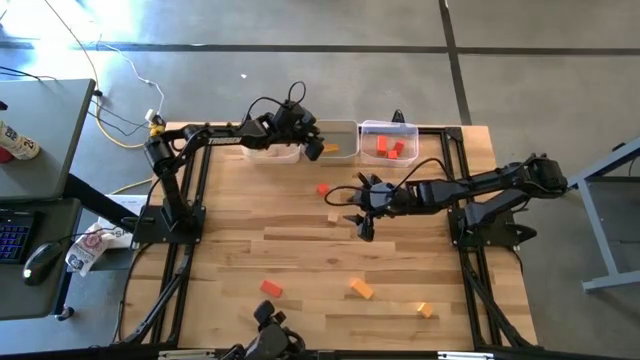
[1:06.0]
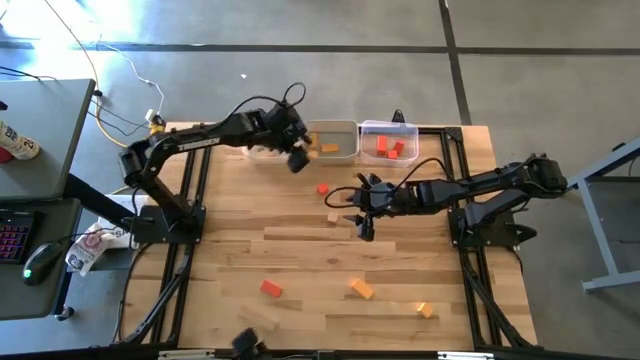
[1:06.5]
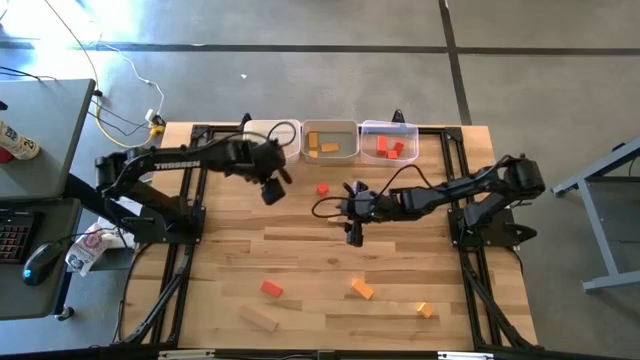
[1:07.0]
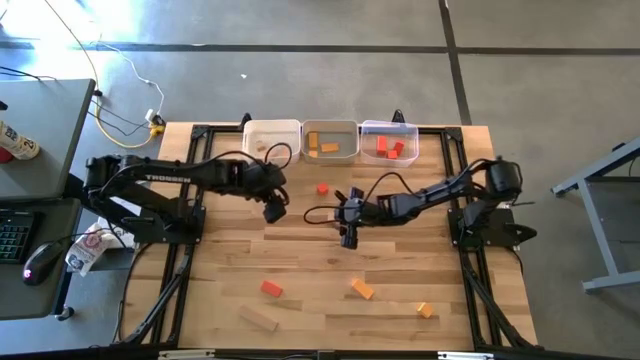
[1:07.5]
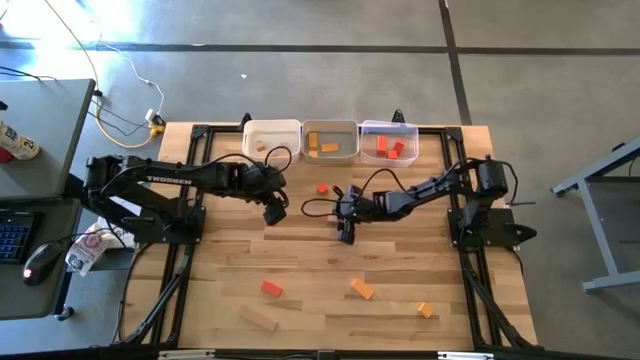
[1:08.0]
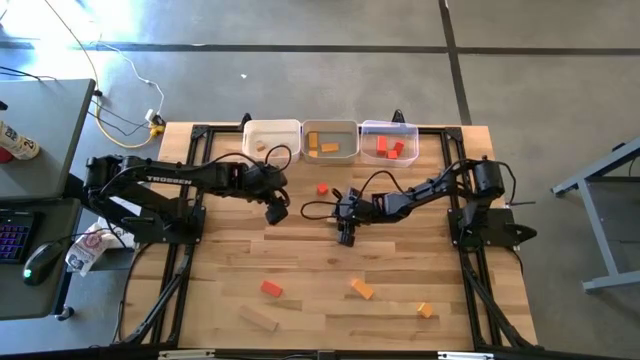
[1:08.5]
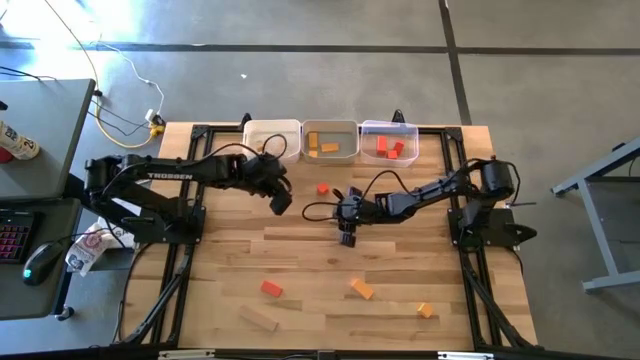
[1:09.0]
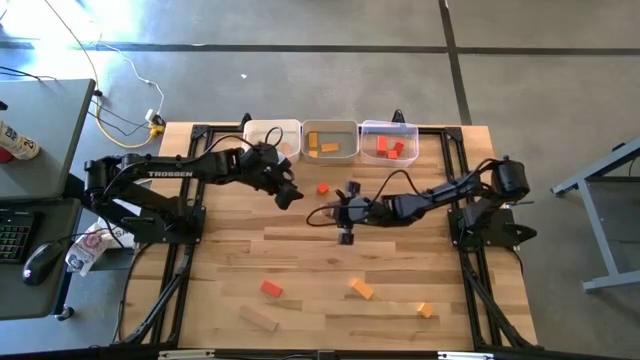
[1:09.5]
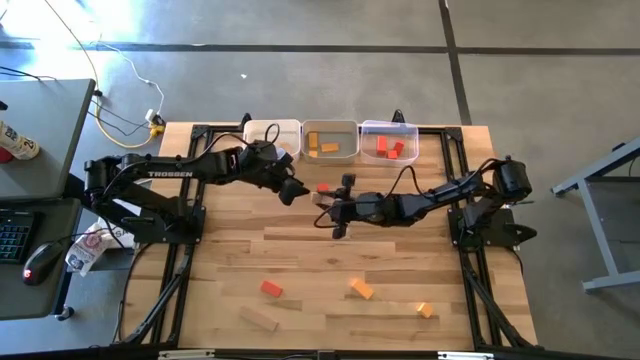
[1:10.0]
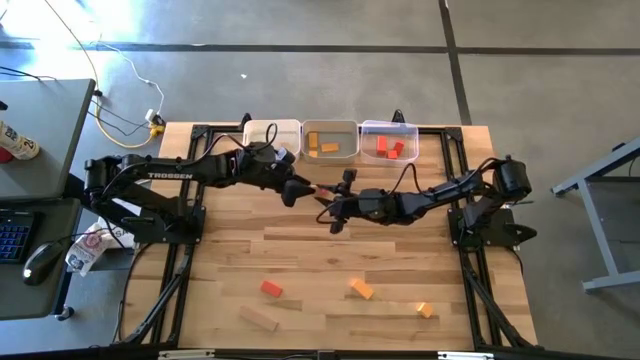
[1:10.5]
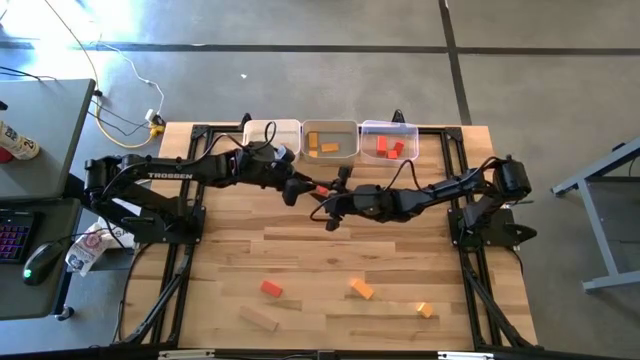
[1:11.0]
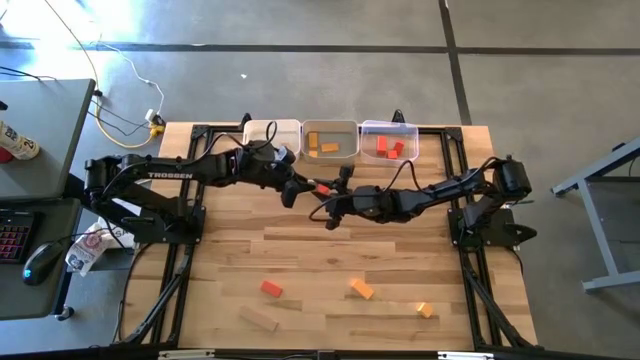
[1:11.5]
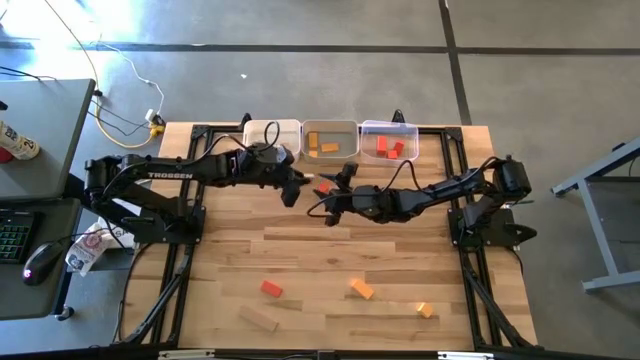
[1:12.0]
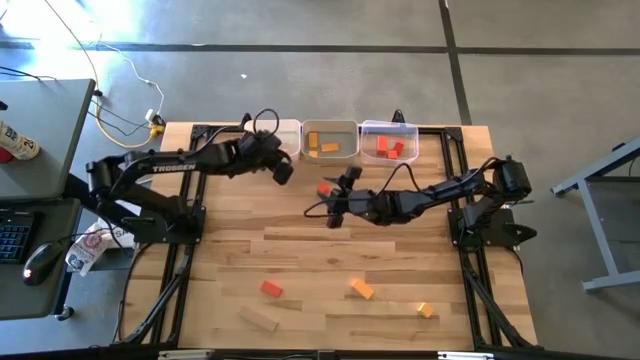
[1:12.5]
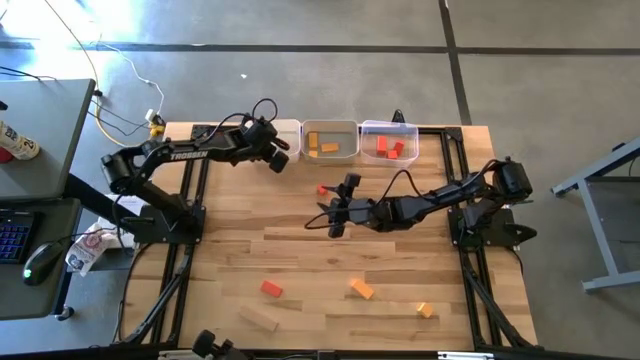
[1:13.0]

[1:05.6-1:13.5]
Task: Sort & place blocks by color
Put the brown block into the white bin

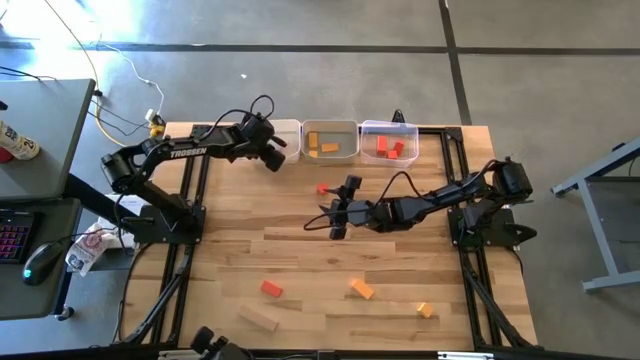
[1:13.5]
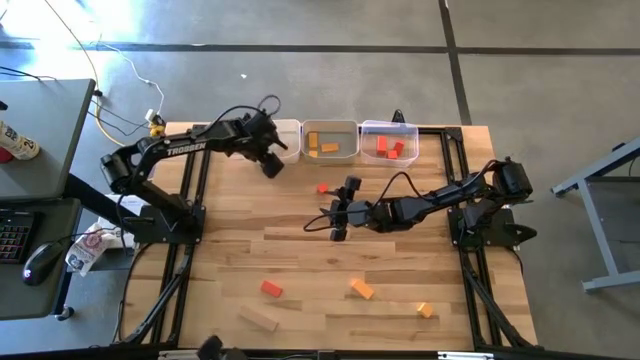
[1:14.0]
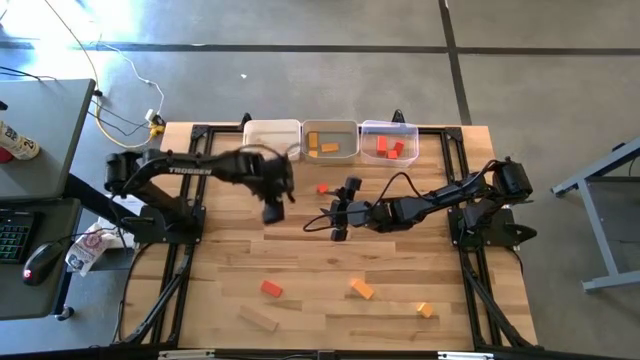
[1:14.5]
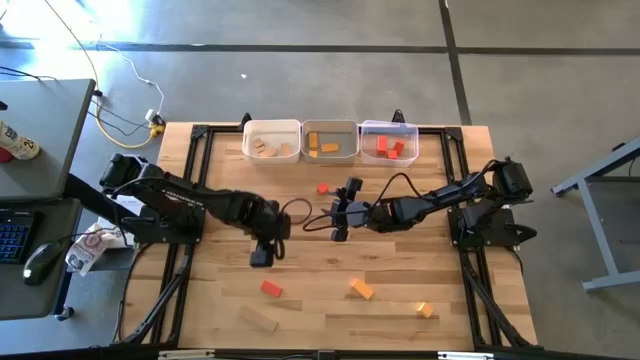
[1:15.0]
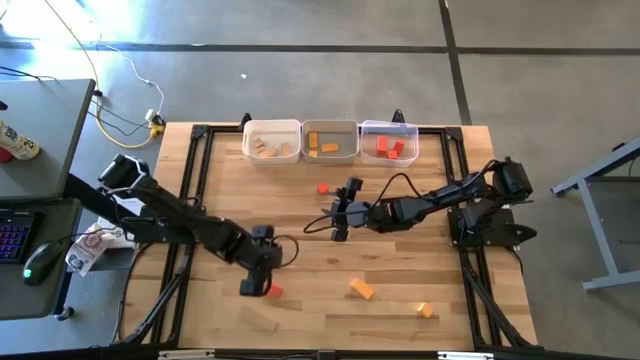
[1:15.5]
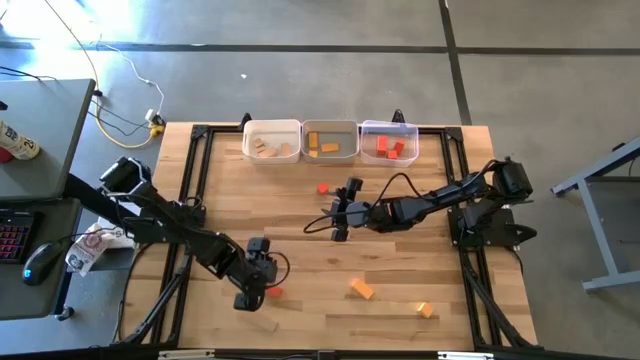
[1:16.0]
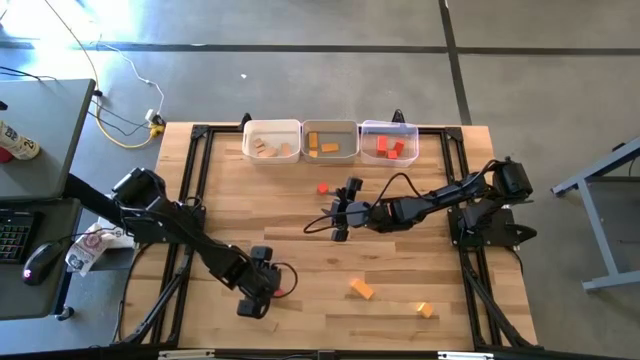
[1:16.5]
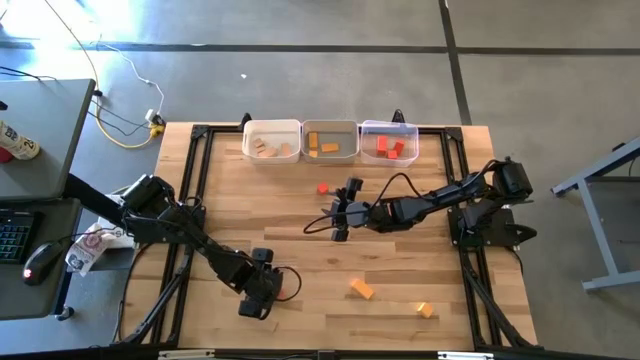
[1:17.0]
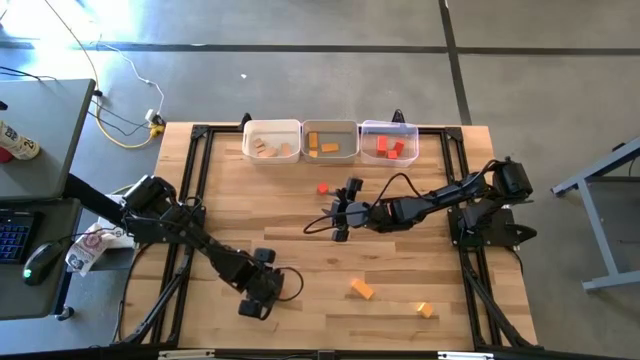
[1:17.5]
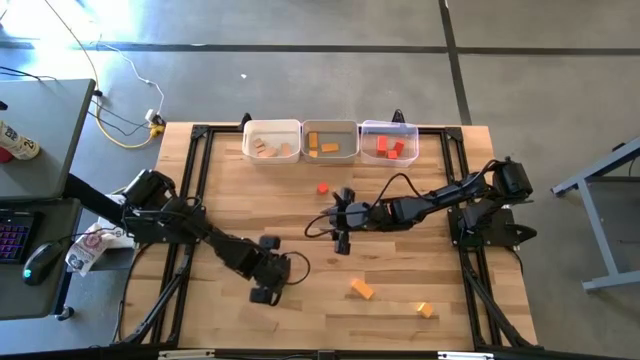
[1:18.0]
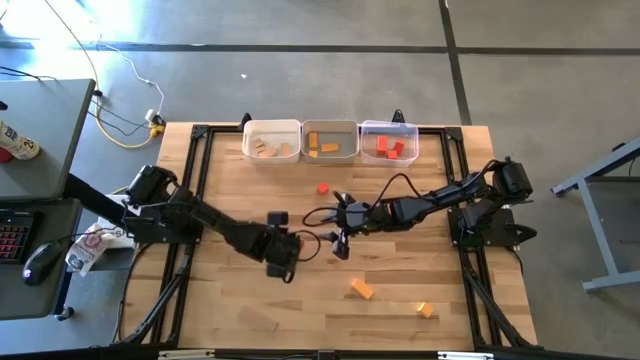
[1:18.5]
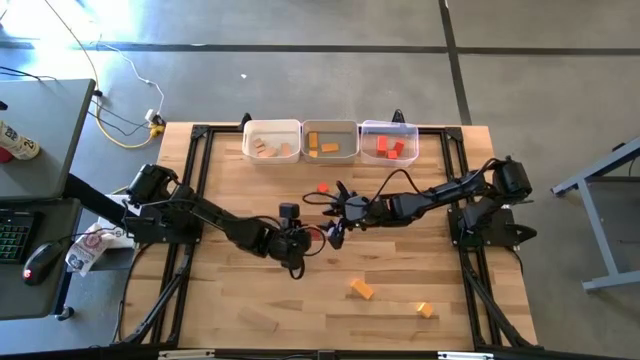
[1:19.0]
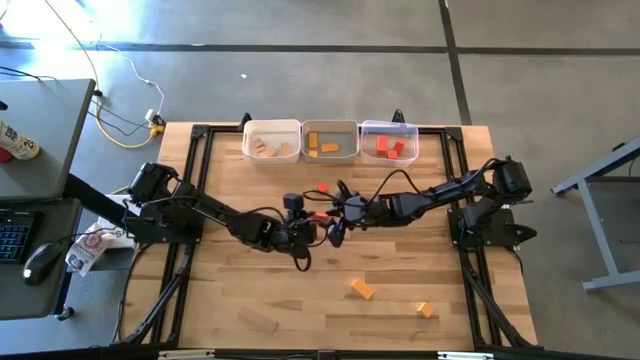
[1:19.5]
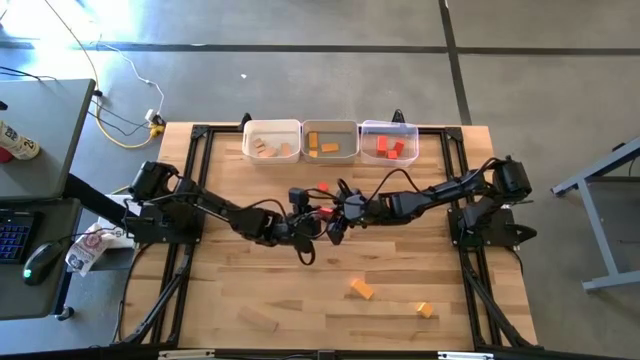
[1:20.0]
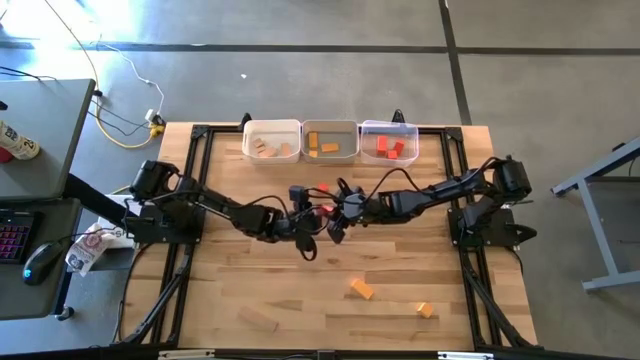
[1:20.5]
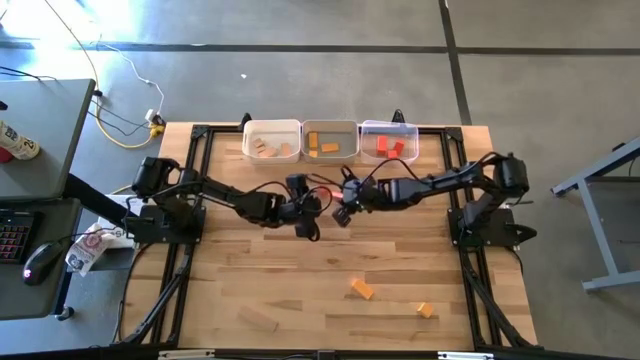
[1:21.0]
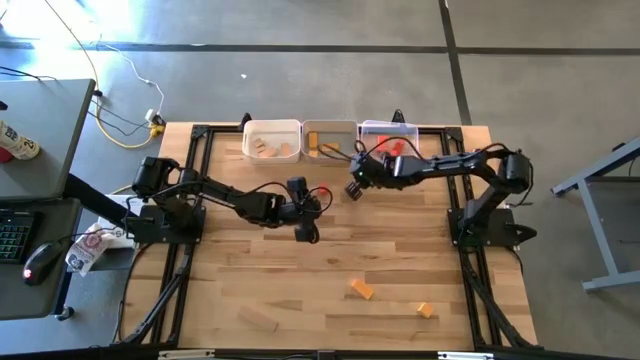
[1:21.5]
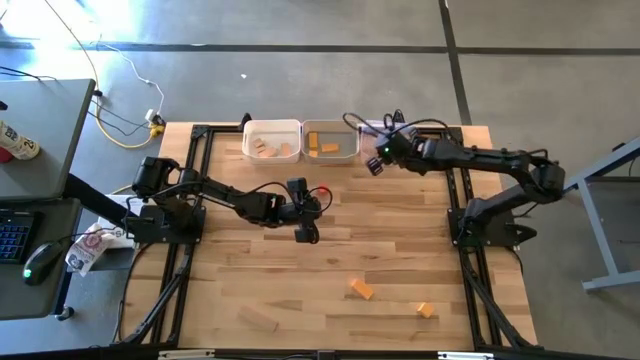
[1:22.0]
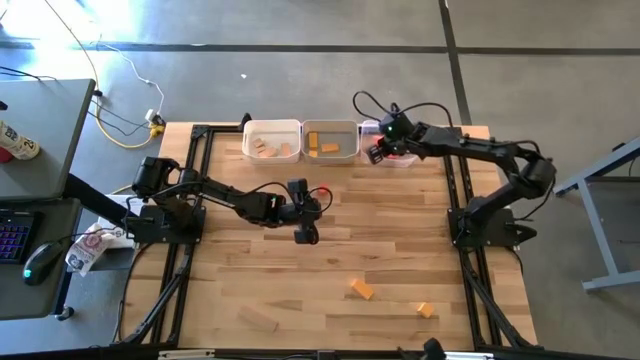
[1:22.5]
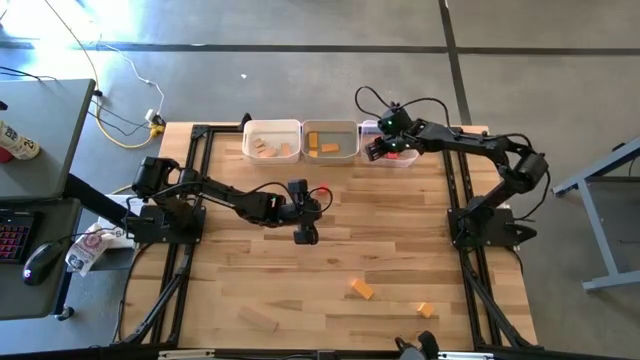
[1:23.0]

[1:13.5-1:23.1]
Put the orange block into the transparent bin

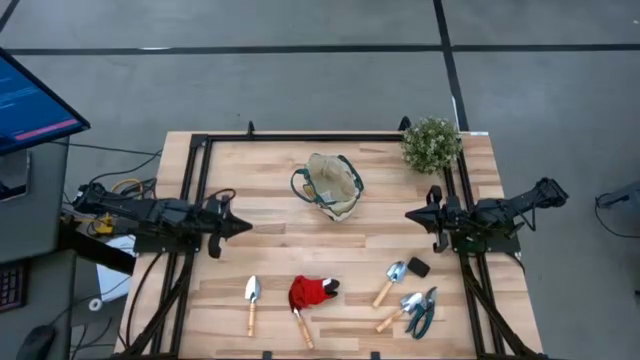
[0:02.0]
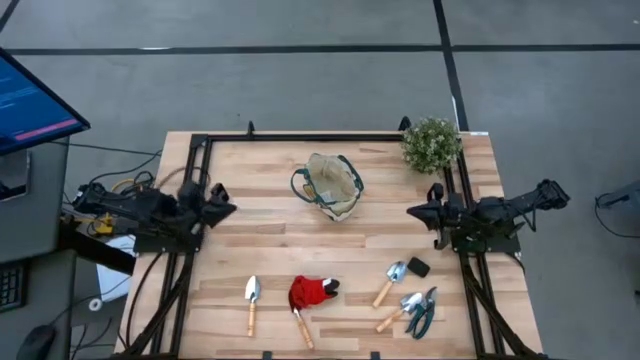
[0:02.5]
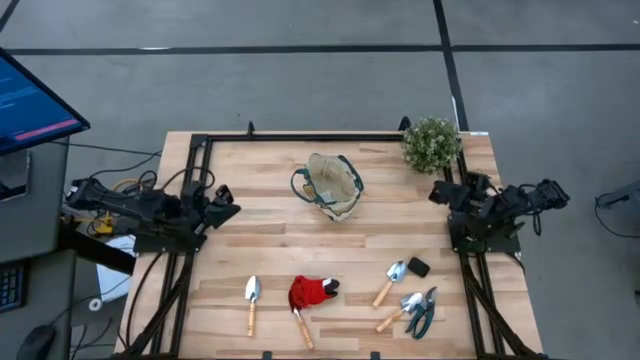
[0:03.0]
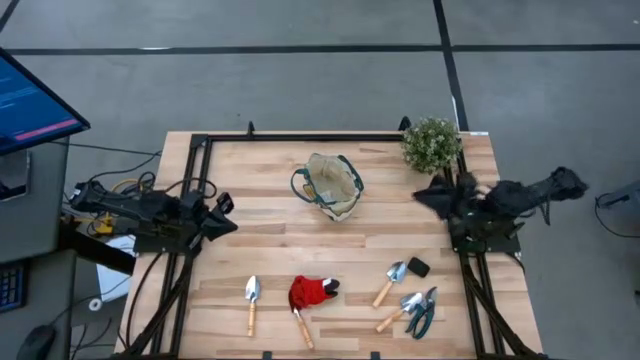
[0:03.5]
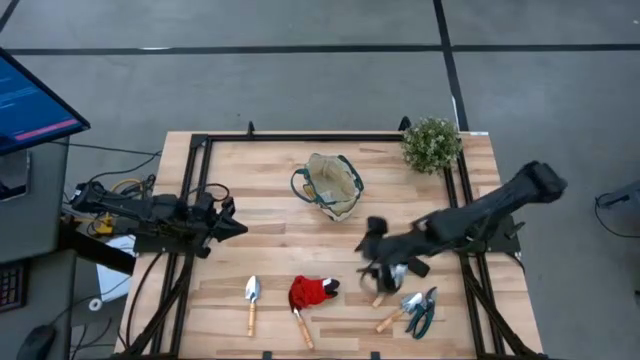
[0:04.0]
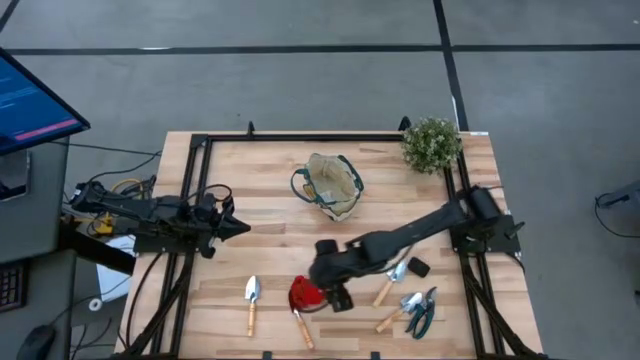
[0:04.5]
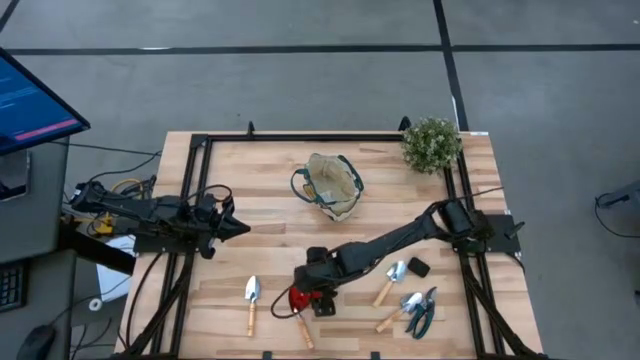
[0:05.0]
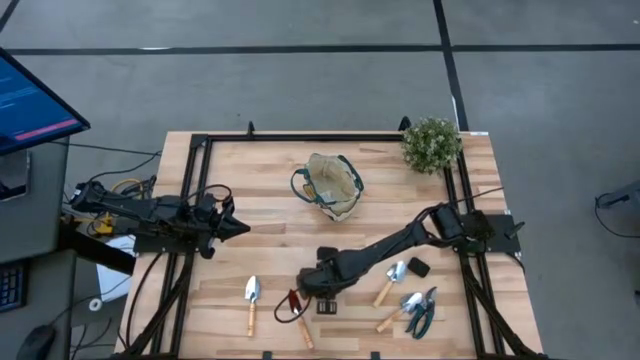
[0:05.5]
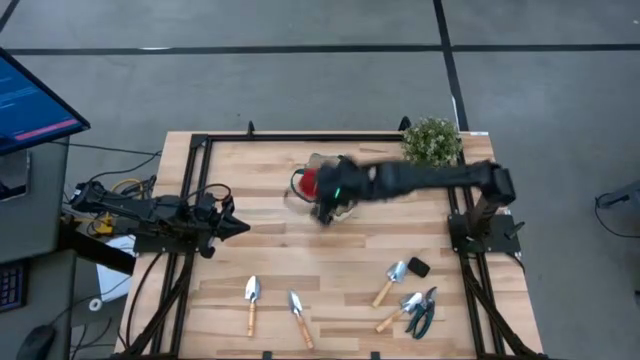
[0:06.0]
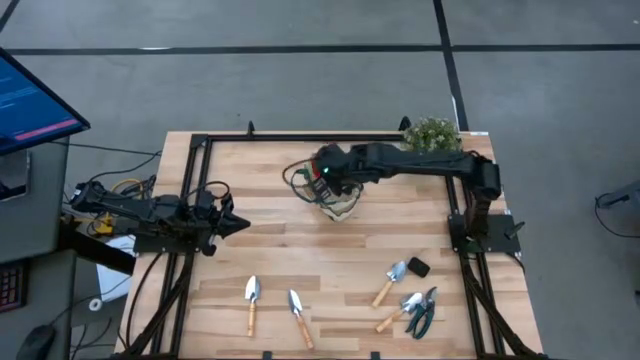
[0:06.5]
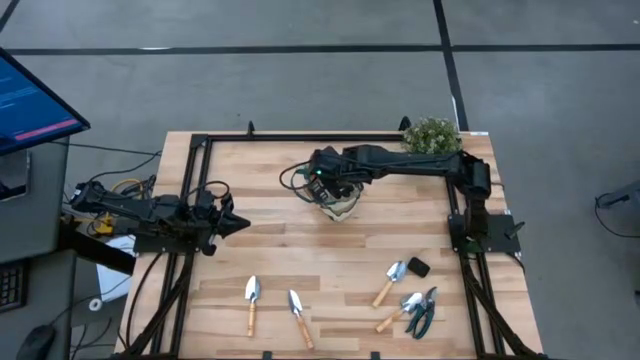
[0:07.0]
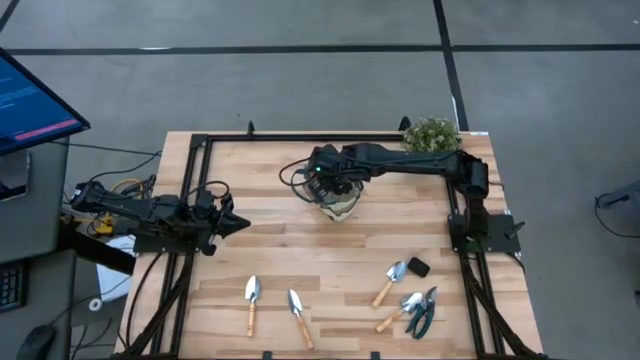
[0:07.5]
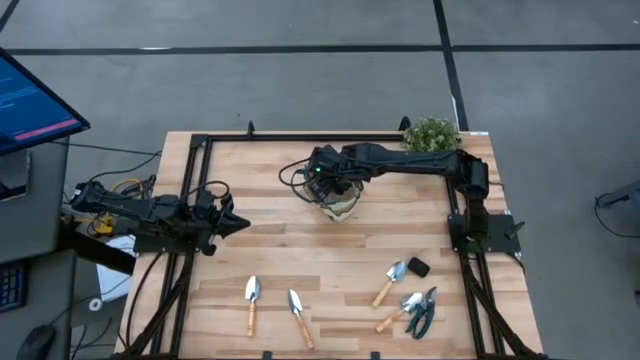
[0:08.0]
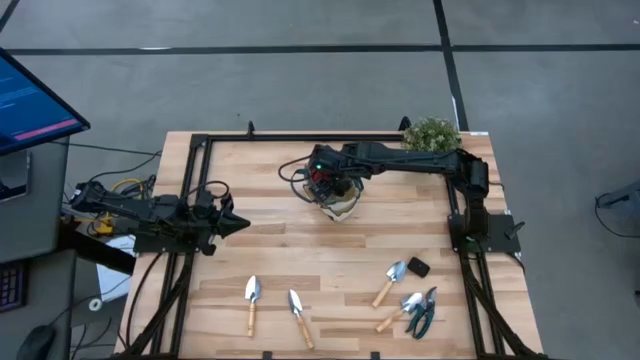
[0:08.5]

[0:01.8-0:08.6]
Task: Pick & Place Garden tools in Gardening bag
Put the red gloves into the green gardening bag
